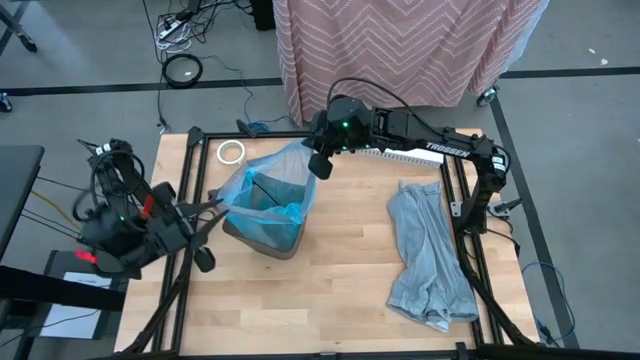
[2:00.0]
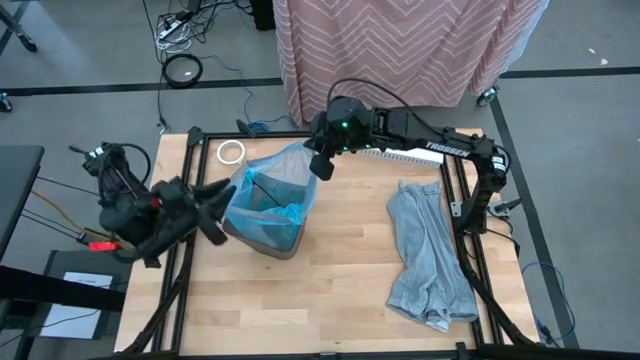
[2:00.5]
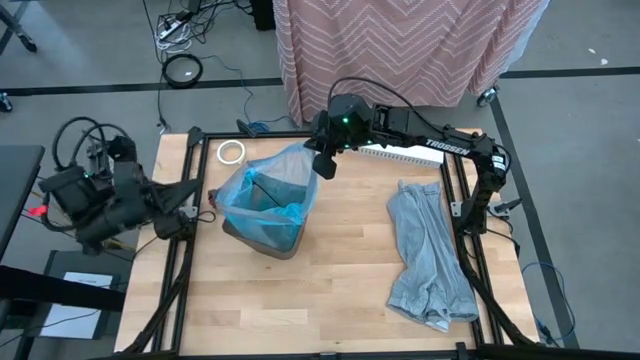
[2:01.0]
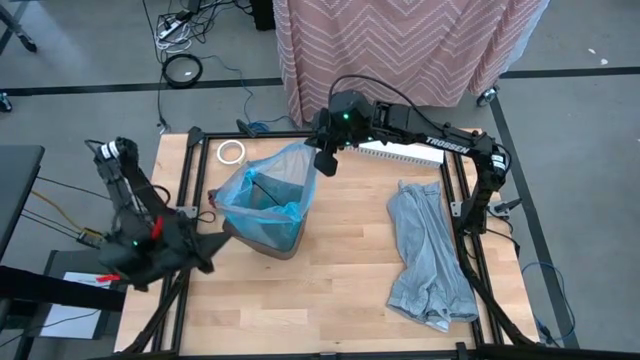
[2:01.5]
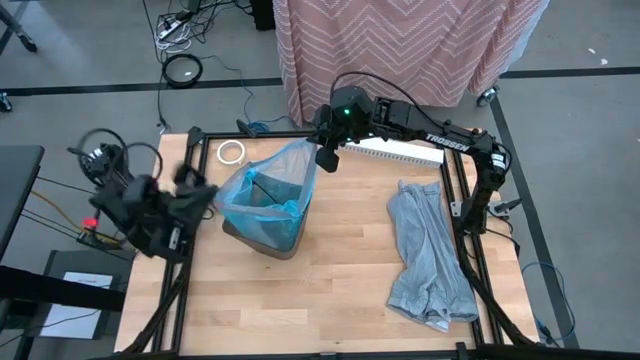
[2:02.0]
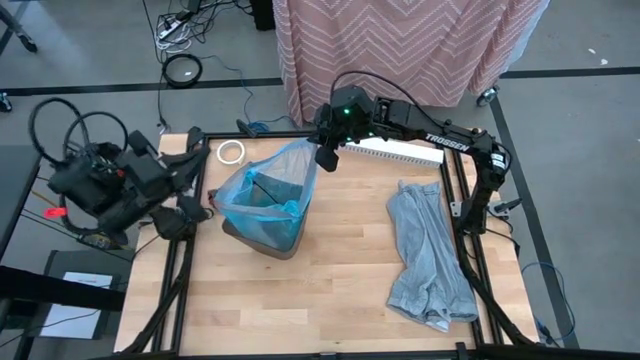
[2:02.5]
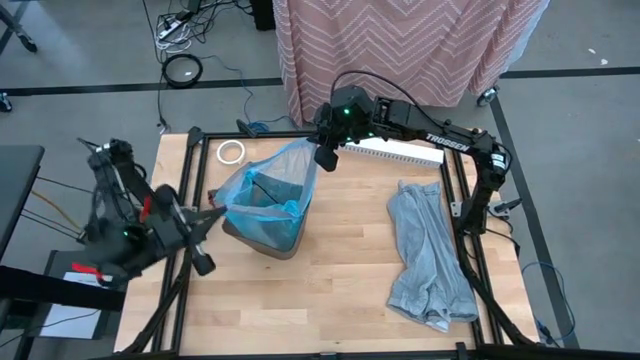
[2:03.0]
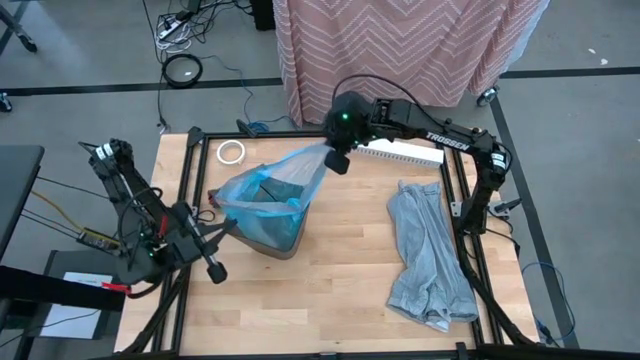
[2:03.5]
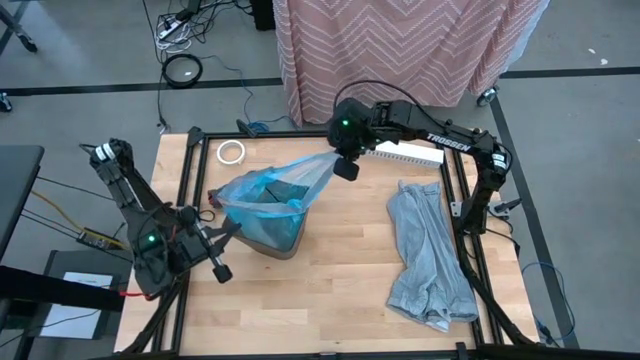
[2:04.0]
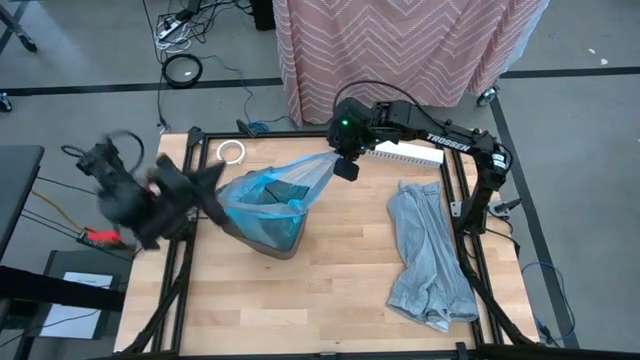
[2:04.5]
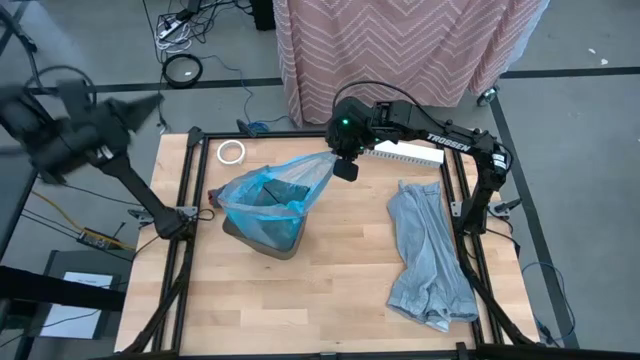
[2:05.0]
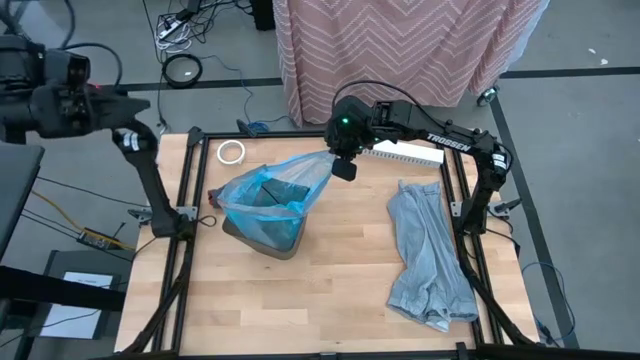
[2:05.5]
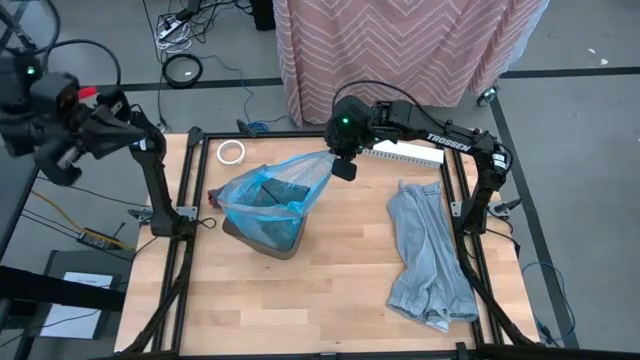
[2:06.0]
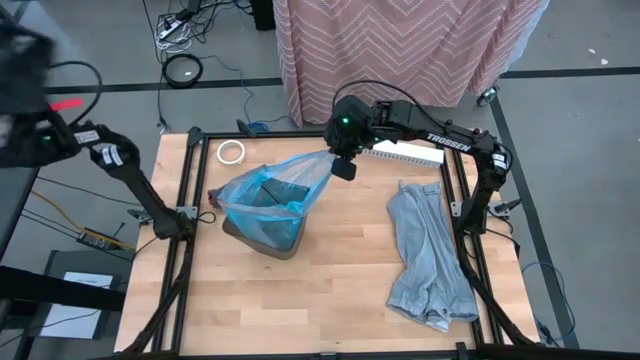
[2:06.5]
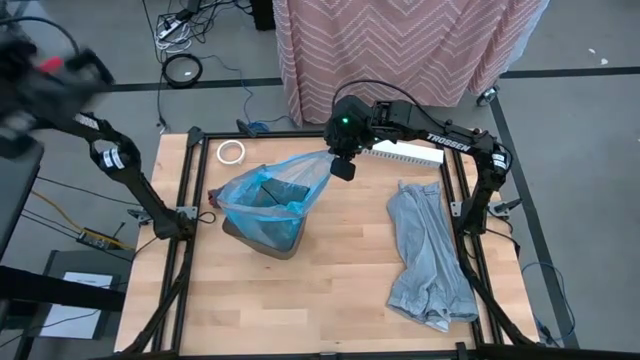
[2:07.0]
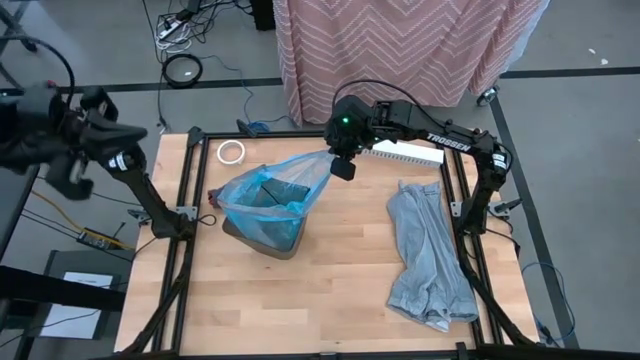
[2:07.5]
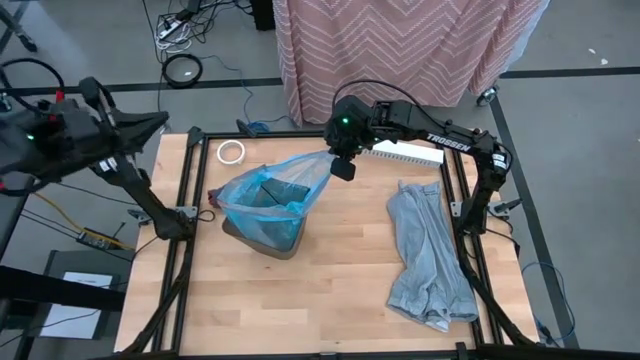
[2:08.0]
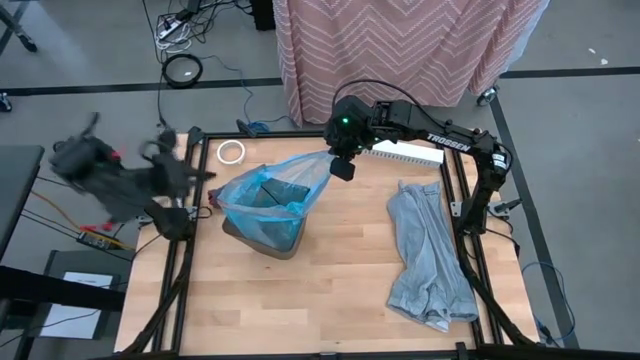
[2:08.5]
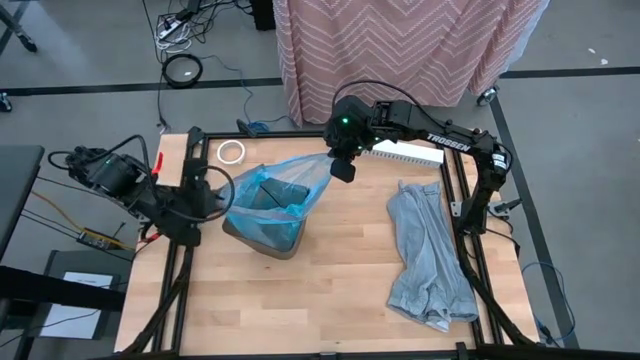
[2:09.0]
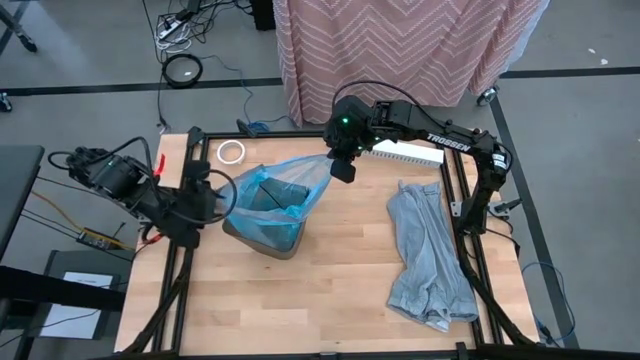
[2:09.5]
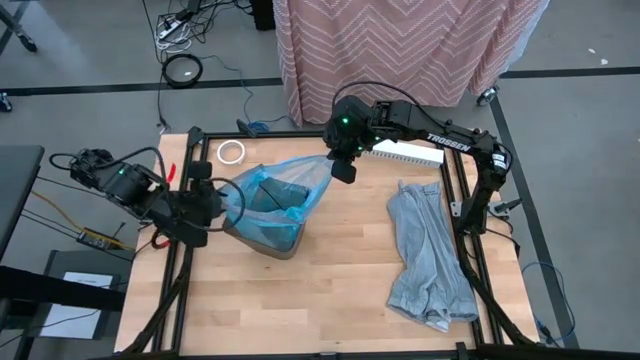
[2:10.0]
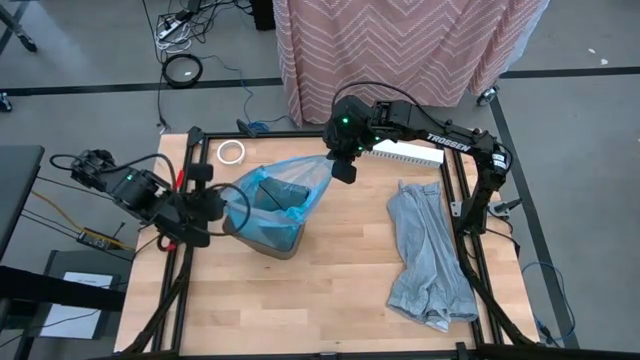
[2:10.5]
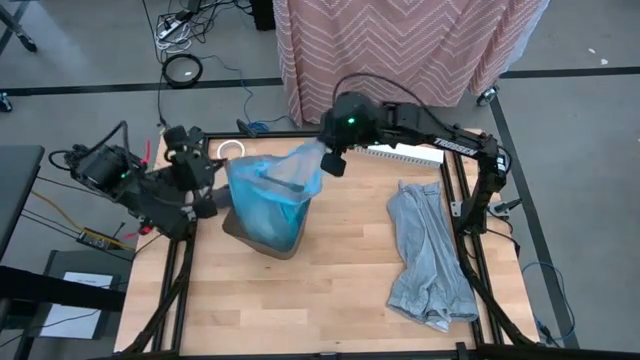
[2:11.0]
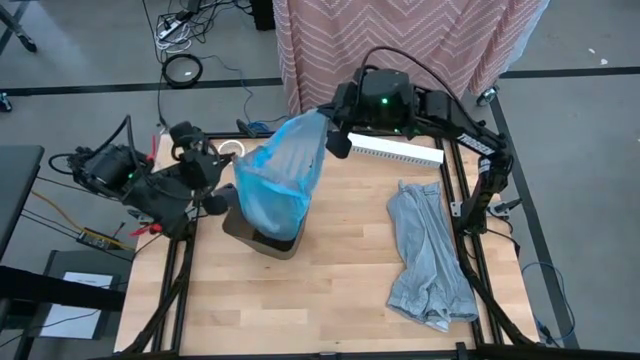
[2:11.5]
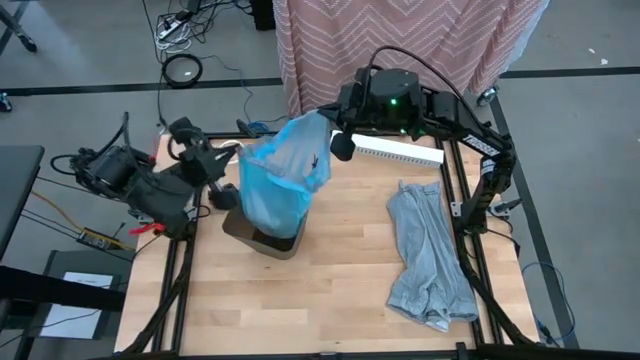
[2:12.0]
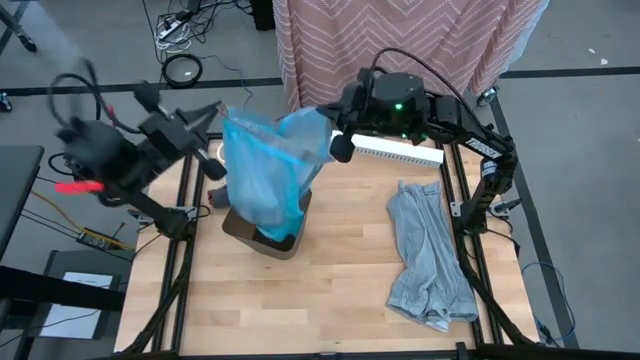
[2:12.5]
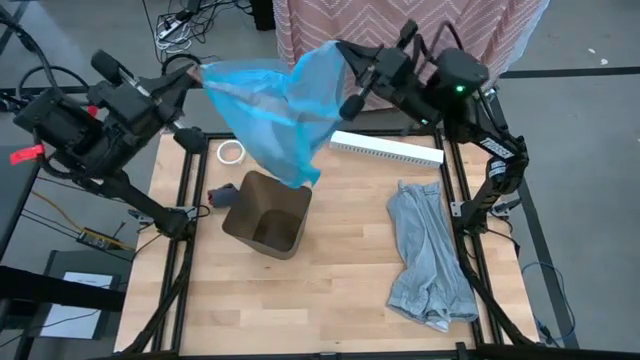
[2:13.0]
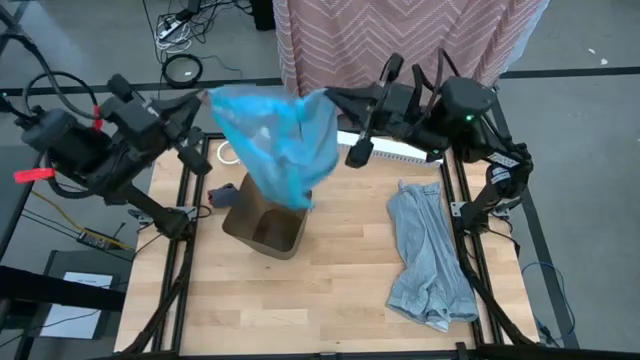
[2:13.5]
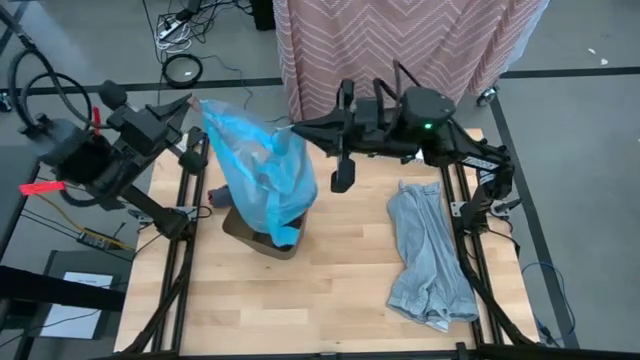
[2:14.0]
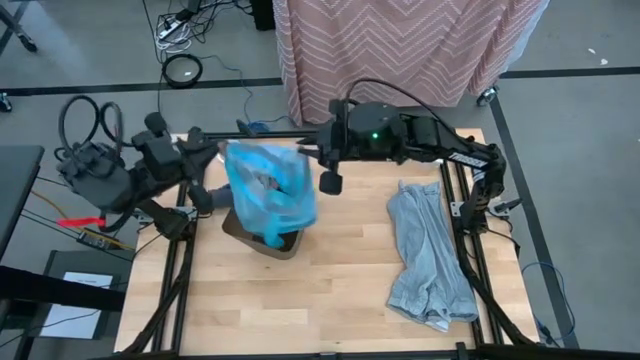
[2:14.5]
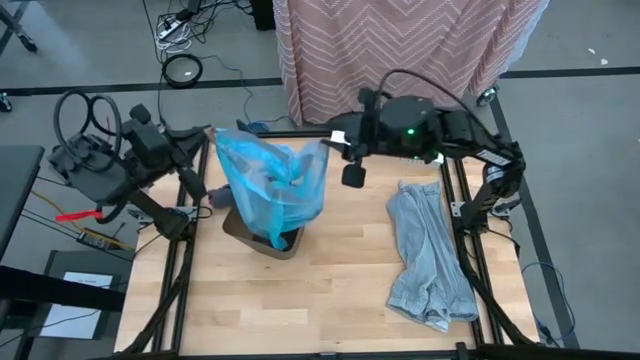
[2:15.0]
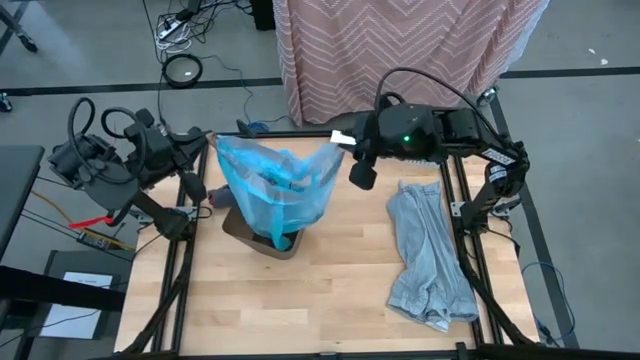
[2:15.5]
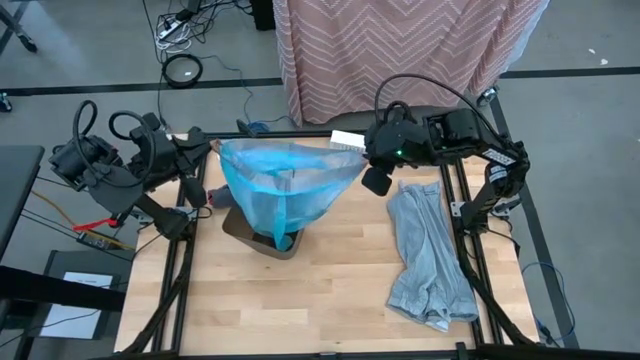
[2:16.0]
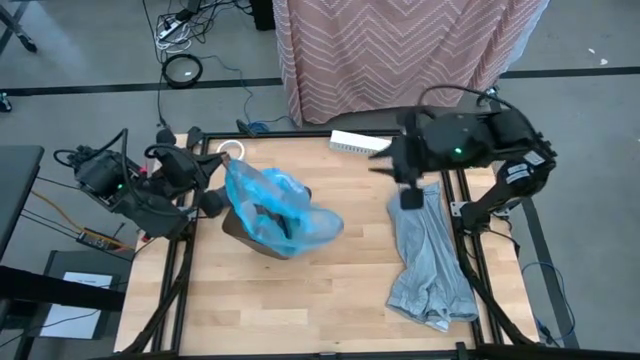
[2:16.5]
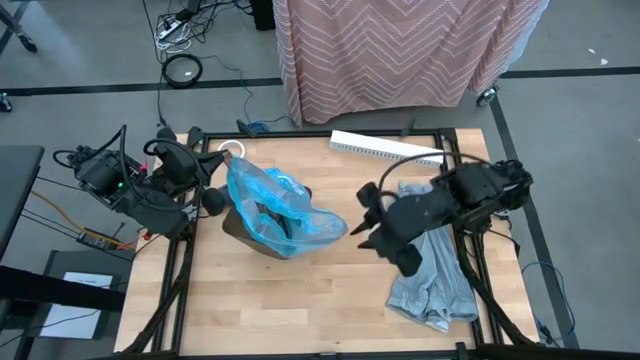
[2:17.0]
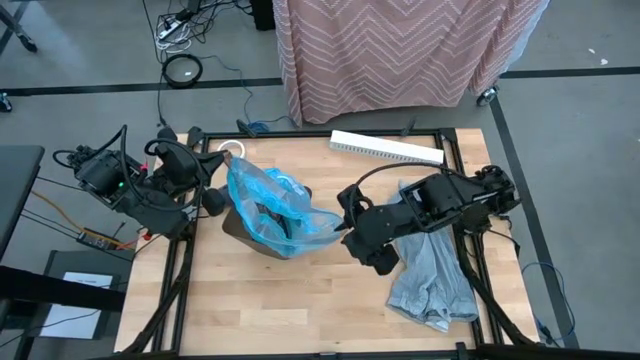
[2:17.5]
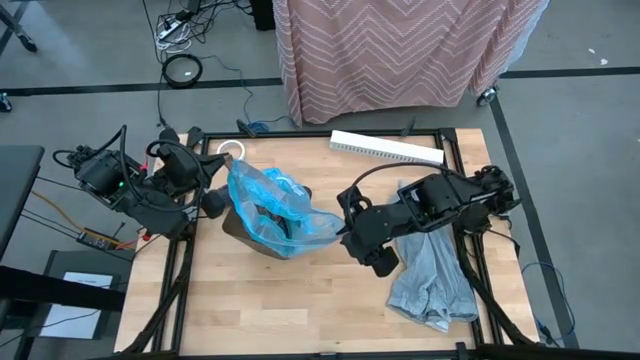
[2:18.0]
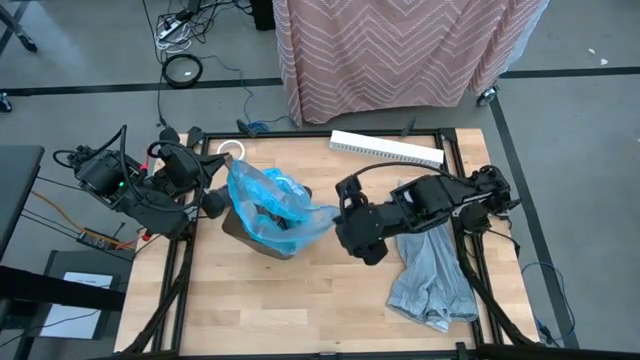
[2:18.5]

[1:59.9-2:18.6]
Task: place trash/remove bag and relplace
Remove the blue trash bag from the black trash bin

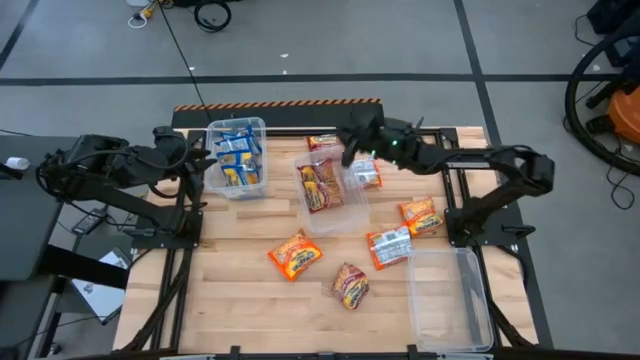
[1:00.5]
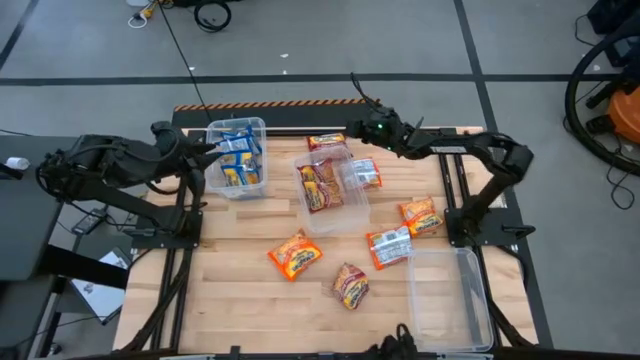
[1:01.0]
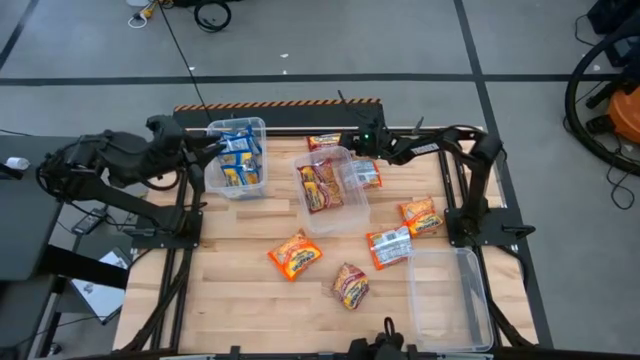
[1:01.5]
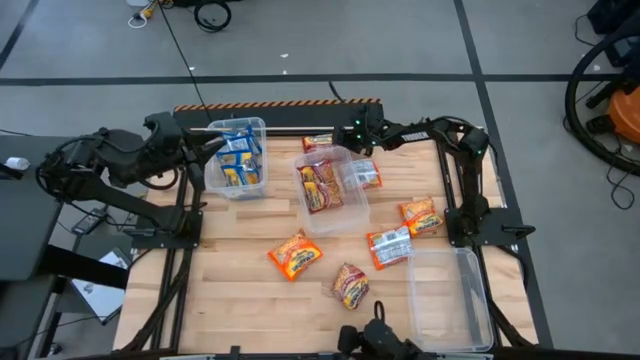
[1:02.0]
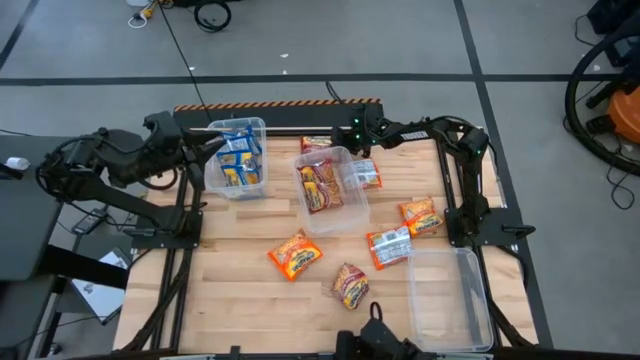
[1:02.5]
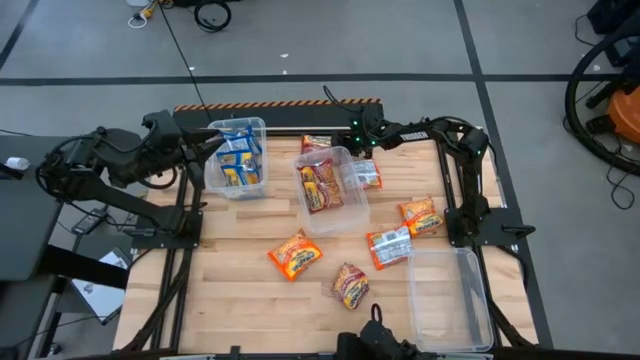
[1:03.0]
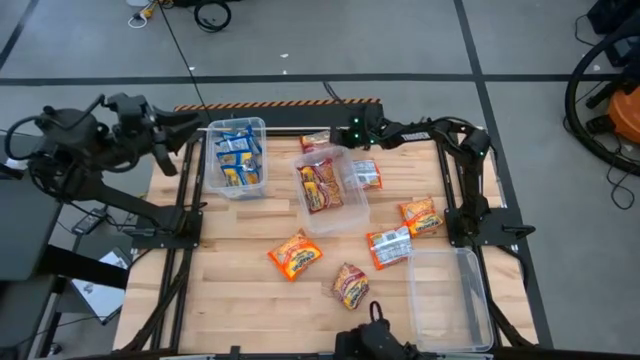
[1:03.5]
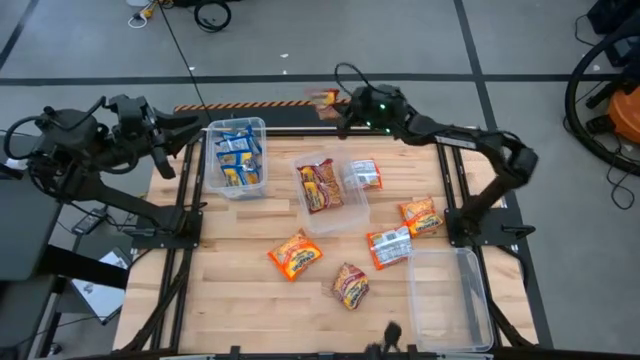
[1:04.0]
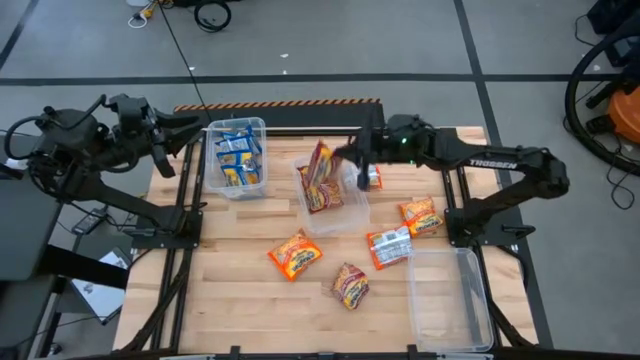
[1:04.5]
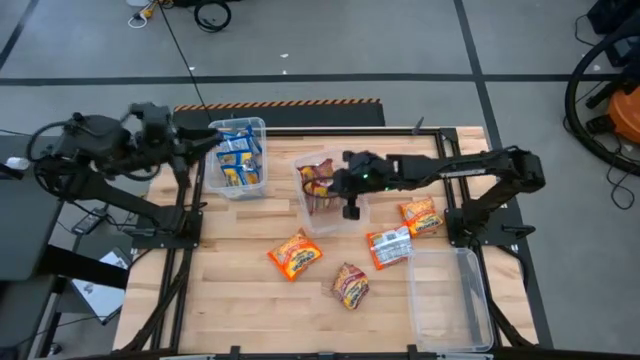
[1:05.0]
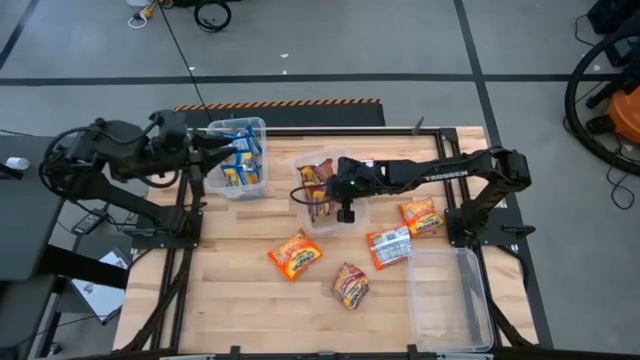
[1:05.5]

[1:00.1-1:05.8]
Task: Sort Maruchan noodles
Put the red noodle pack into the middle transparent bin
